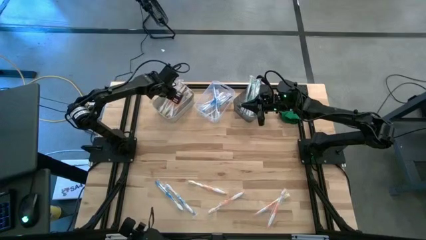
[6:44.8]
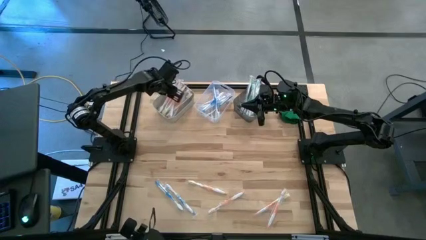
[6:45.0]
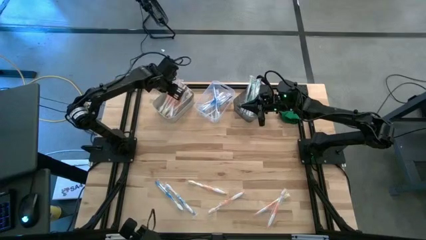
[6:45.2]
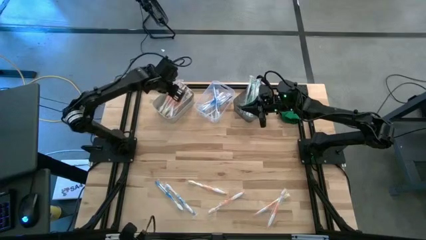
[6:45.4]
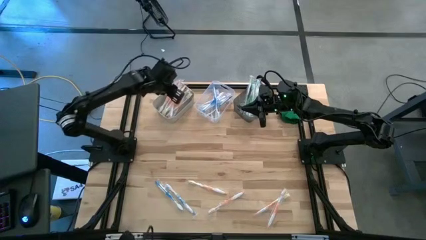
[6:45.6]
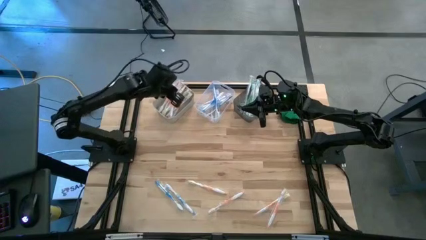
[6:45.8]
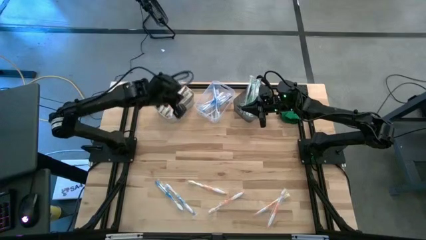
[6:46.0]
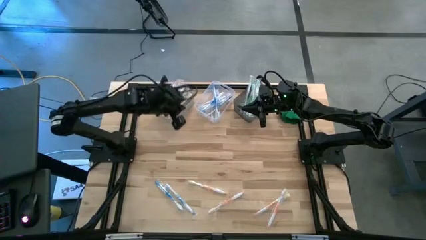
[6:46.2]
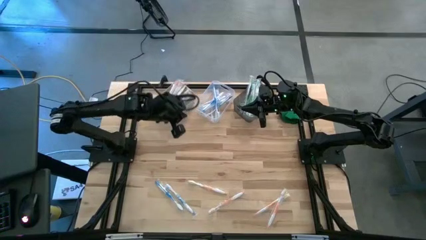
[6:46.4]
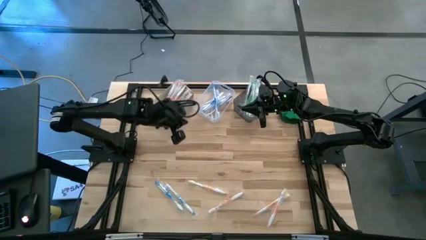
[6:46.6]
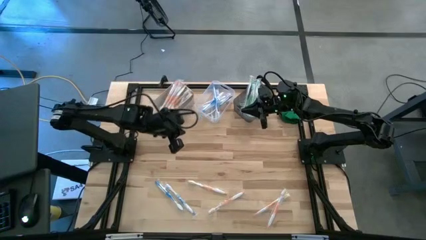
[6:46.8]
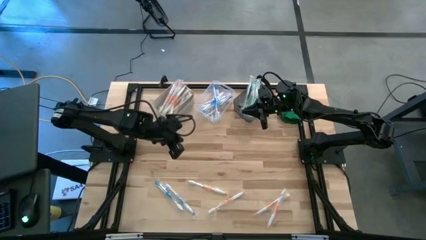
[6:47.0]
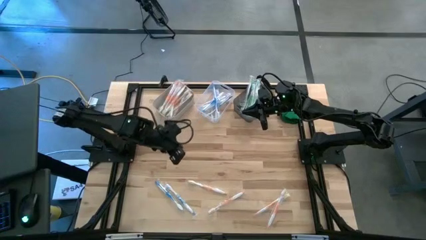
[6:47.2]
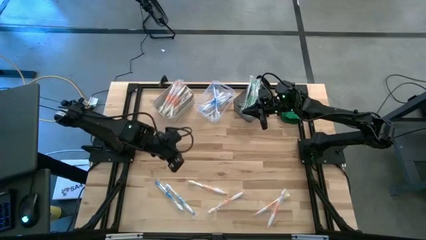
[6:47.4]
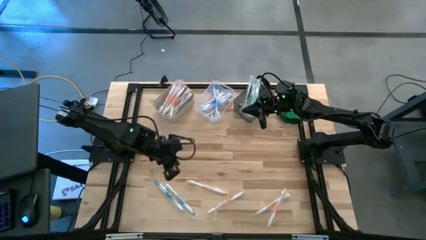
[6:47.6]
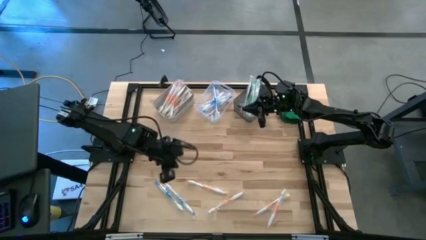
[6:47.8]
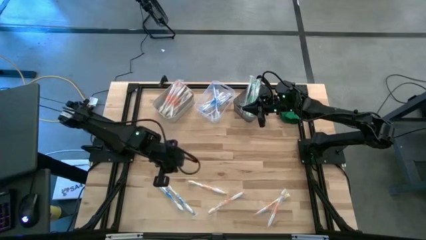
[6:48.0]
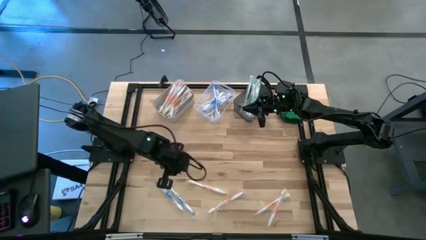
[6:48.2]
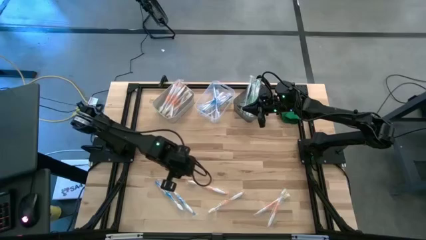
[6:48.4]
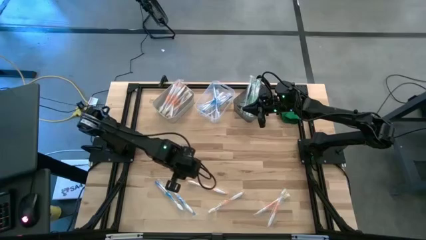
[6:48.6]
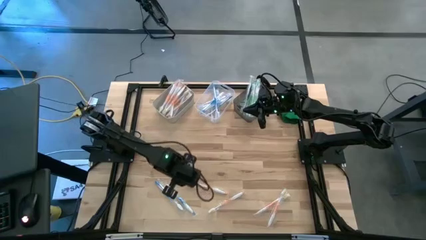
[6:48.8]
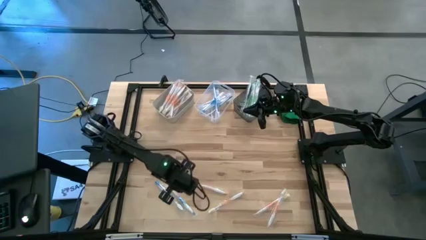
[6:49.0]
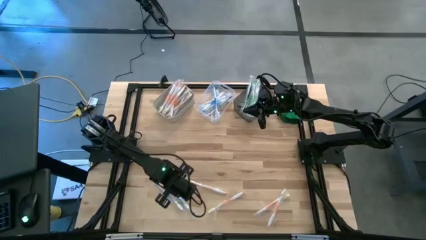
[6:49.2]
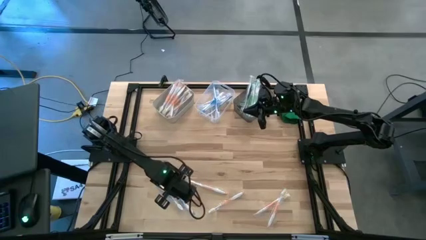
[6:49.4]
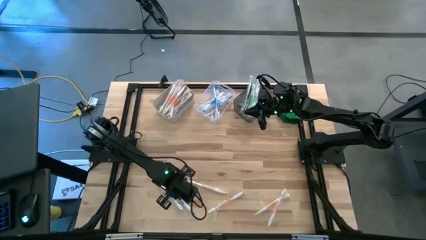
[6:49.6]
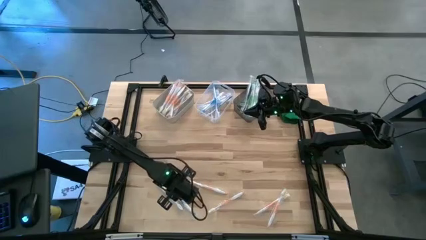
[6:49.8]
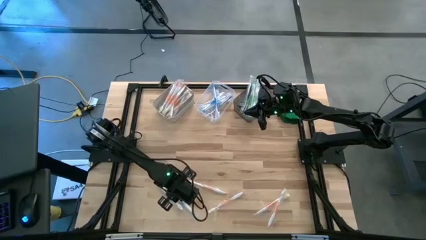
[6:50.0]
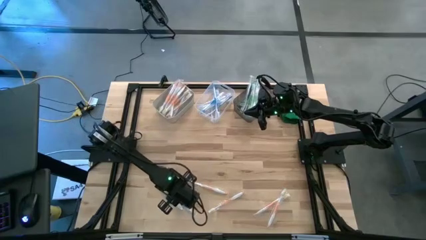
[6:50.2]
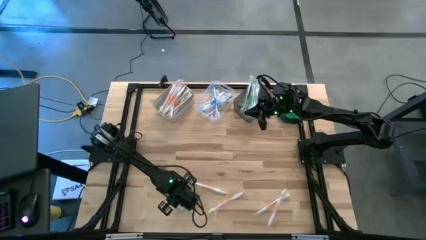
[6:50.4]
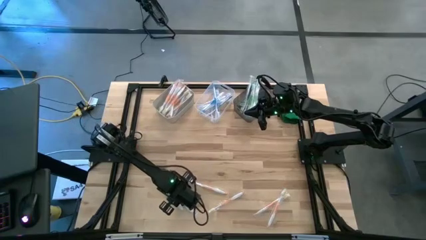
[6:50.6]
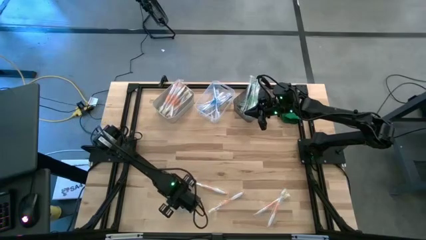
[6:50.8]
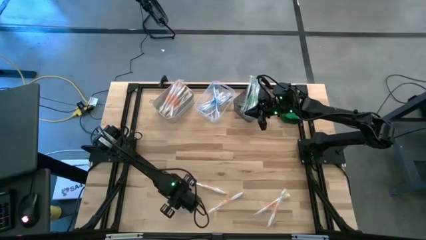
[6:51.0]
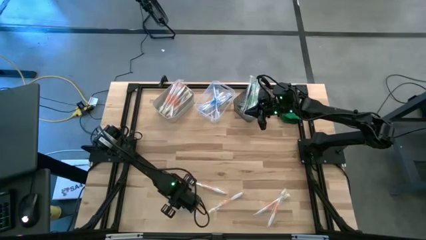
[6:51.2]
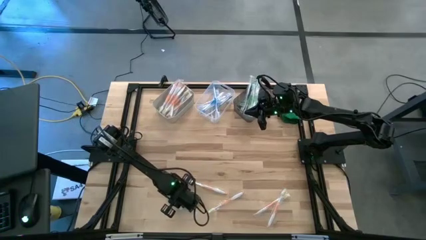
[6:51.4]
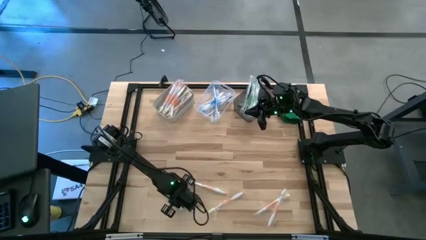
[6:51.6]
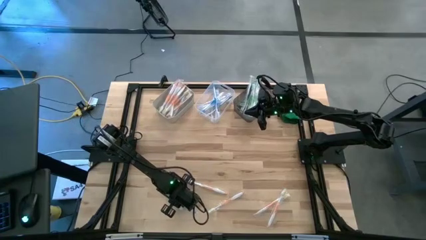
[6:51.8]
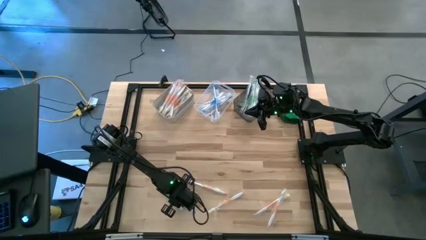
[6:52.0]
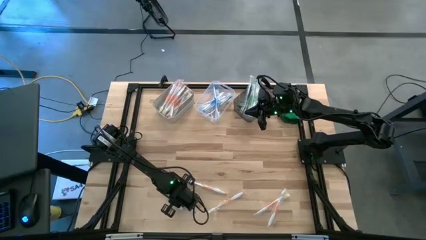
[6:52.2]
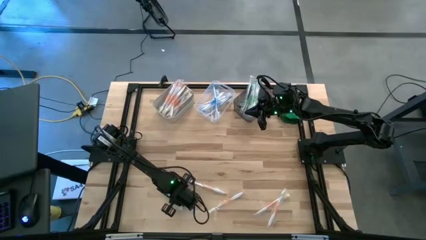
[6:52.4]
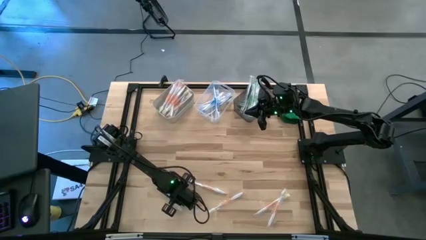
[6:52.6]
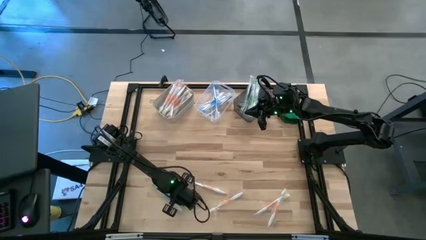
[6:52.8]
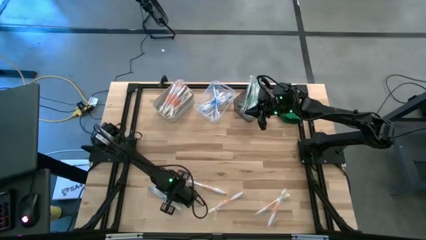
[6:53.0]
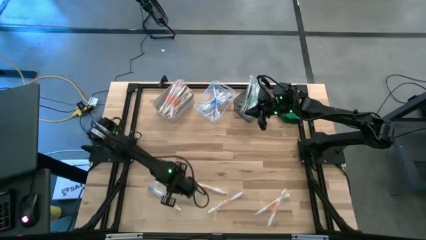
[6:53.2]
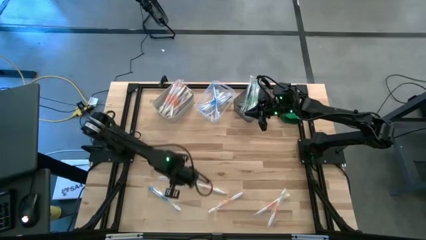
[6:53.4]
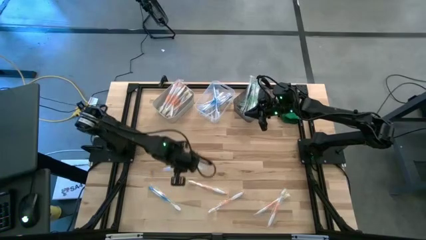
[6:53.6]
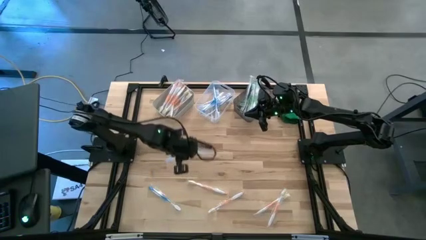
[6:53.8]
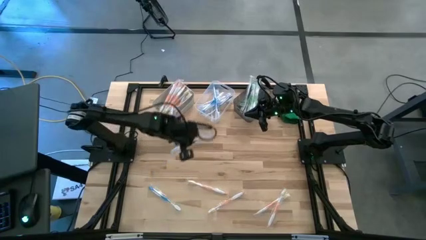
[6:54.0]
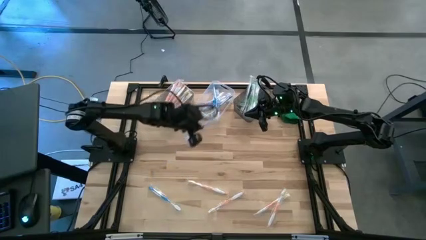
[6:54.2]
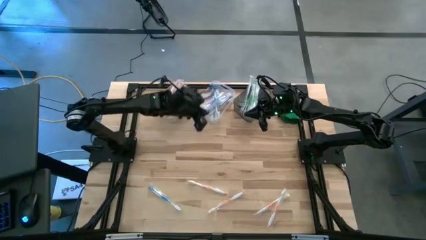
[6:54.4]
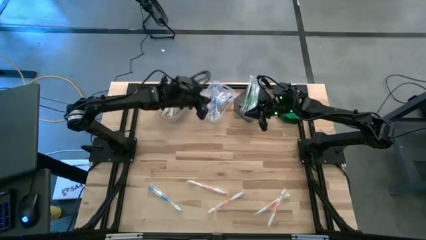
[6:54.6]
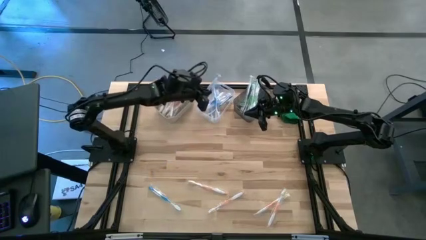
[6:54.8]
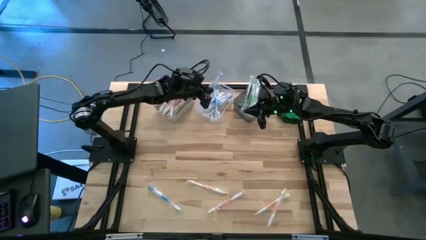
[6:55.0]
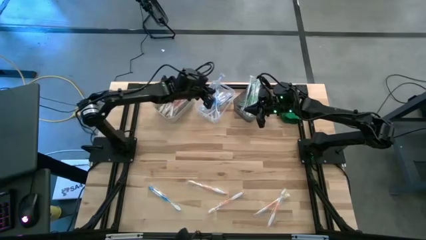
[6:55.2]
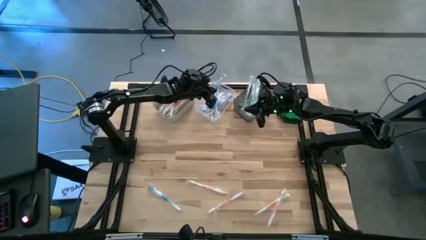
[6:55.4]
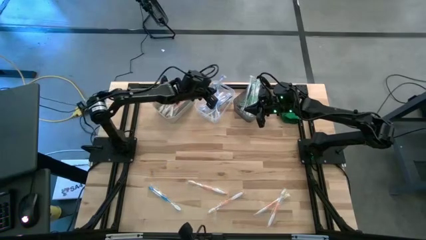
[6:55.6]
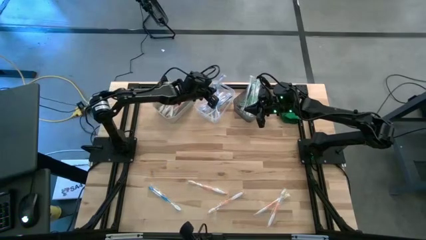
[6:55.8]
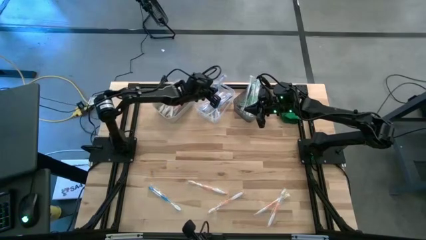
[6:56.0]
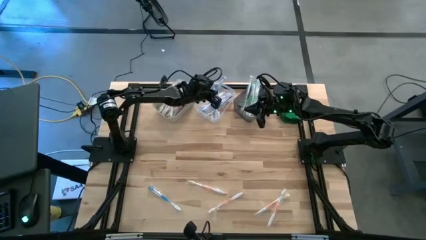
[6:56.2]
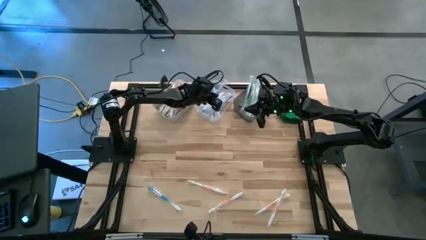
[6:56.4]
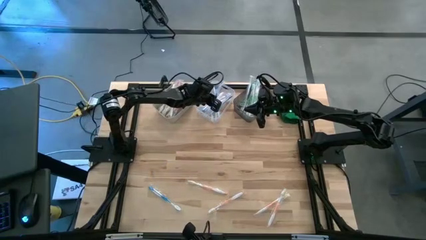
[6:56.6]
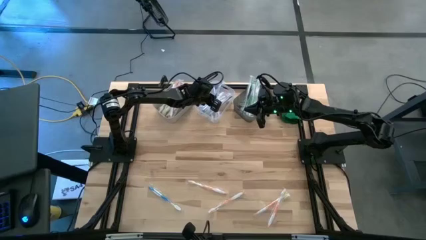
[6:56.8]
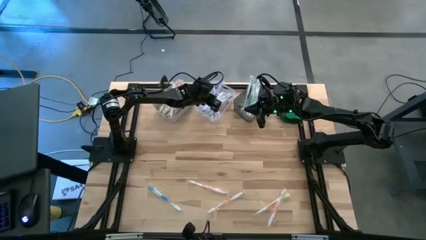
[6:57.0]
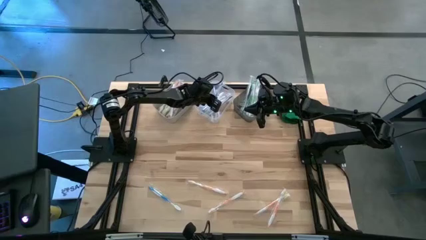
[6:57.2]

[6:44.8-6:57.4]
Task: Pick & Place Toothbrushes
Put the blue toothbrush into the clear bin

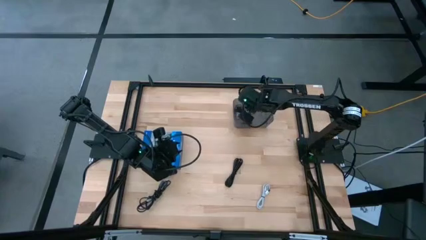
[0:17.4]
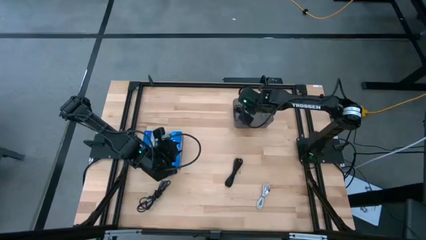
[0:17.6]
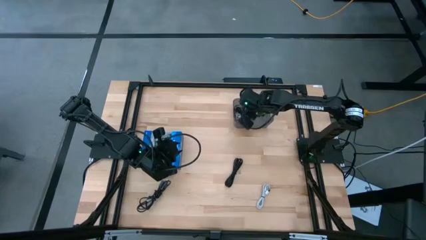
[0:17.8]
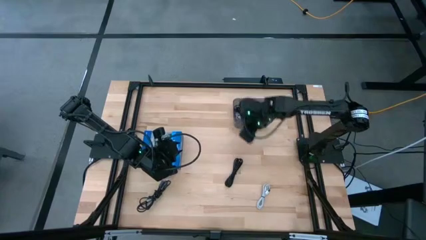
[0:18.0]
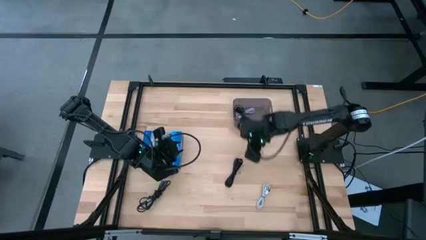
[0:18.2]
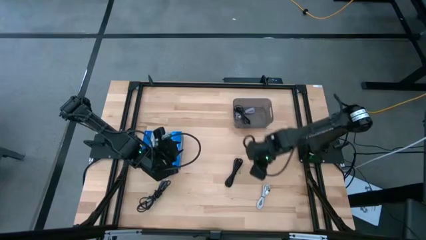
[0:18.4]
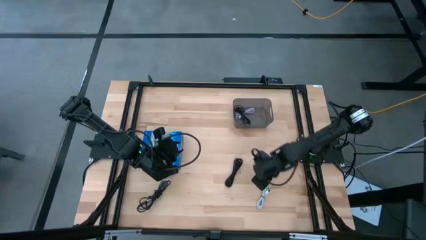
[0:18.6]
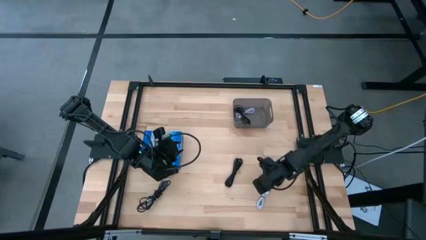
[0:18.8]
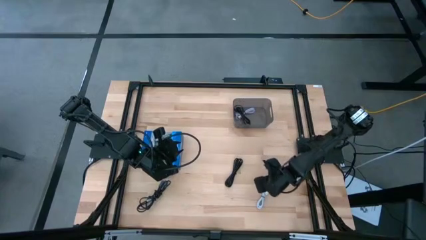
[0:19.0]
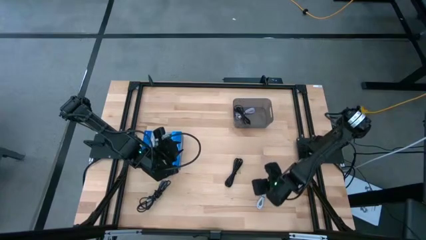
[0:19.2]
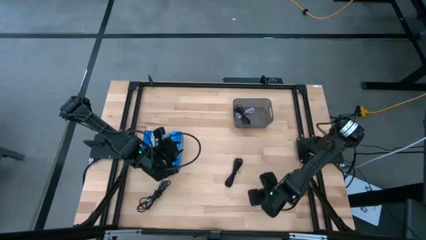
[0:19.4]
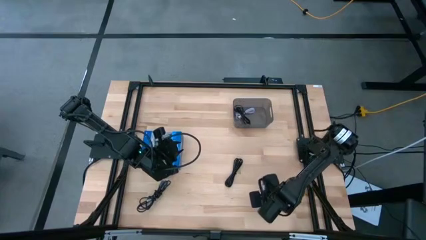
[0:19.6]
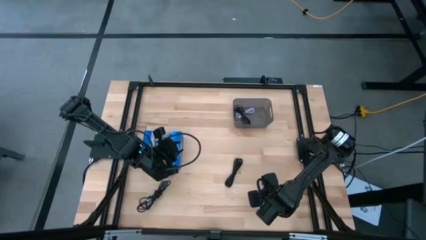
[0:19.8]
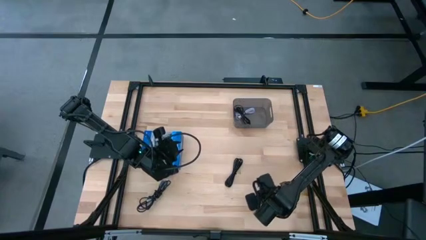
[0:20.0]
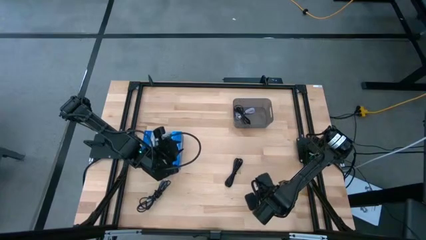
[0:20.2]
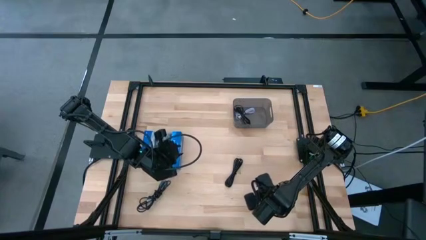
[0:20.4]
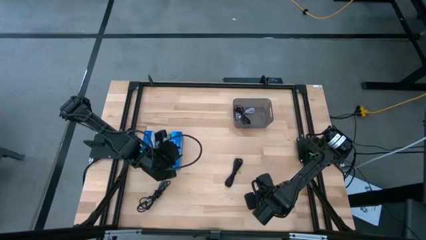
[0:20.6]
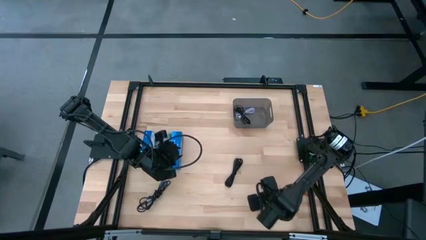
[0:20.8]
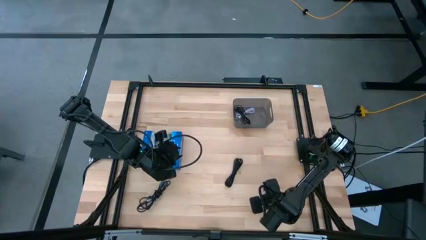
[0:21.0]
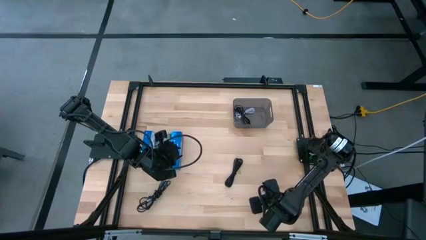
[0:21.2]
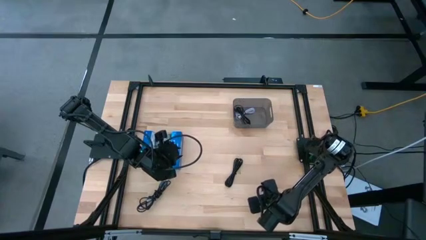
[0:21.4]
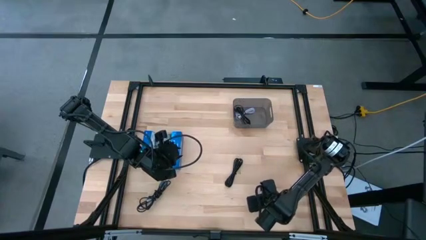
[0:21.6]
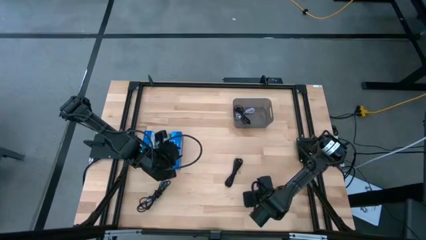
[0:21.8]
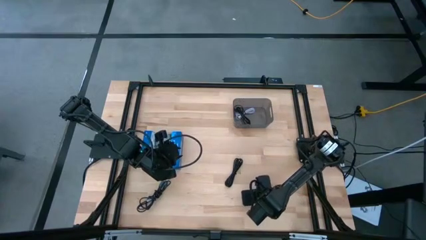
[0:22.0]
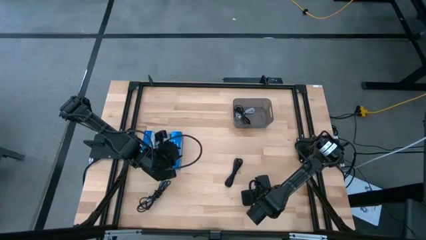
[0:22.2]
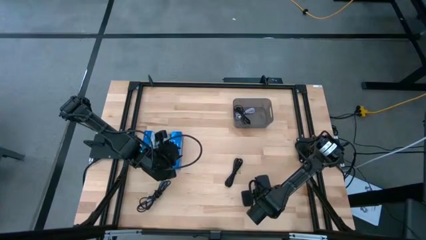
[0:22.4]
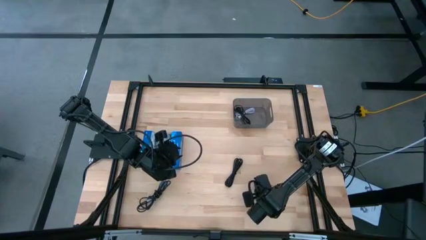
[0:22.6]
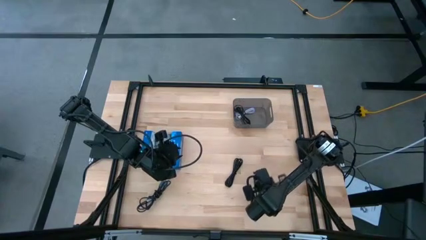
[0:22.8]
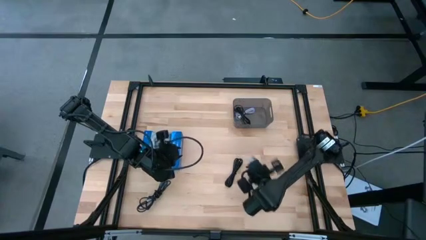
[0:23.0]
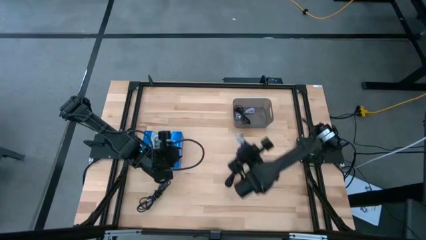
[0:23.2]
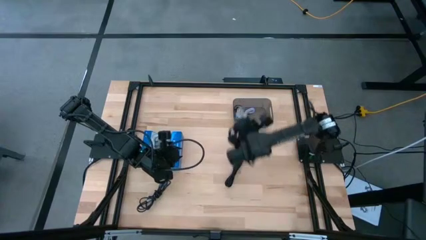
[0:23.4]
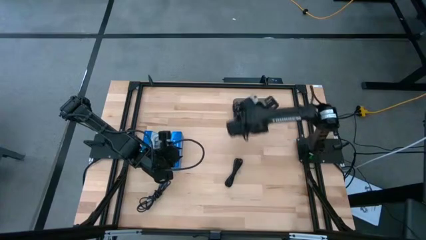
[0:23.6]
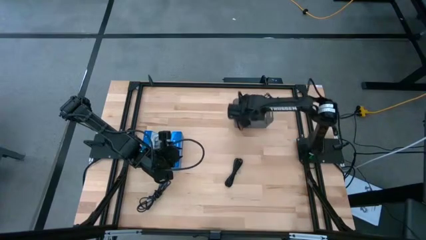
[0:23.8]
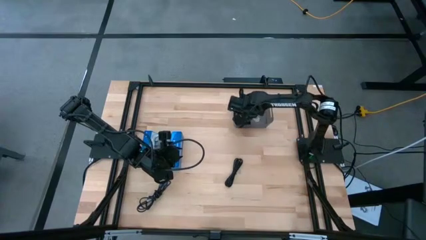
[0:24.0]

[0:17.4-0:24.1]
Task: Pick and place USB-C Cables
Put the white charger cable into the black bin
